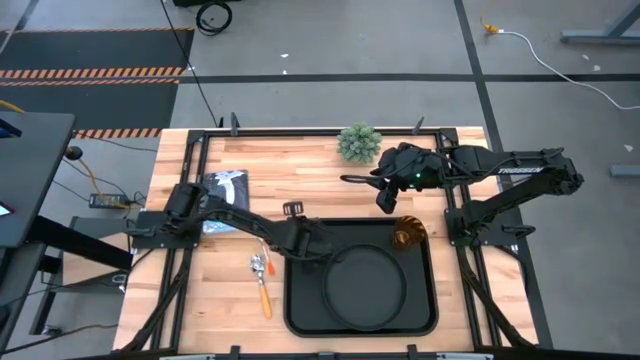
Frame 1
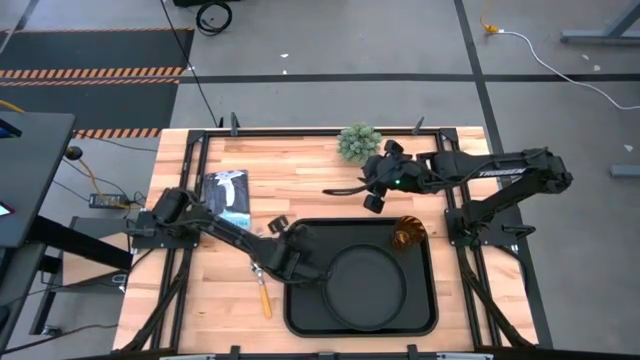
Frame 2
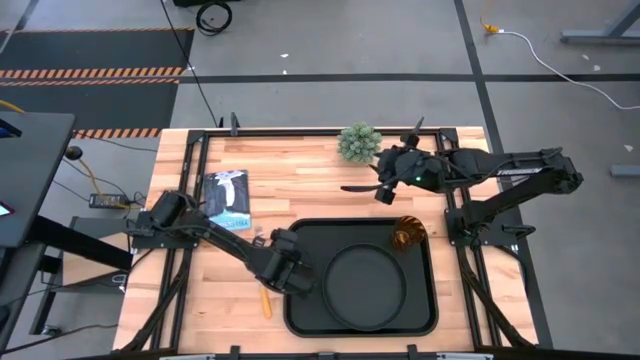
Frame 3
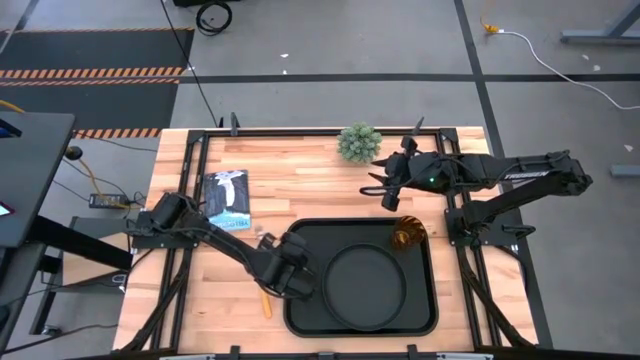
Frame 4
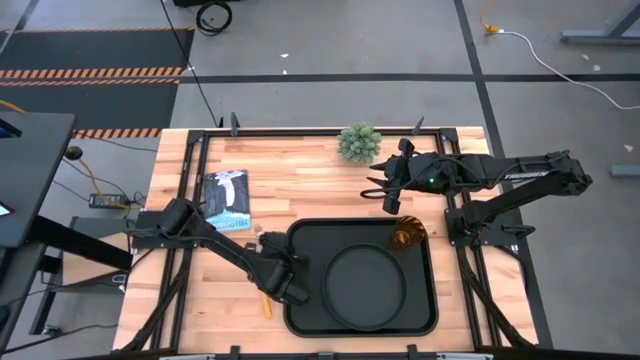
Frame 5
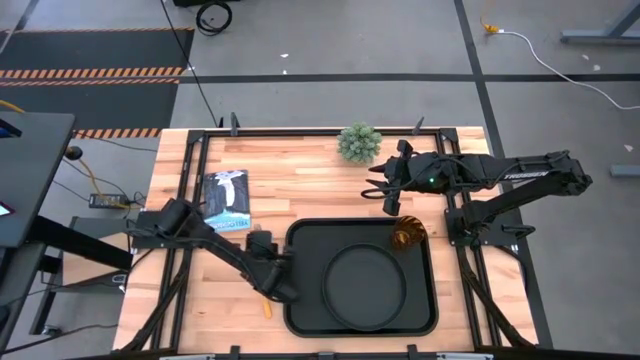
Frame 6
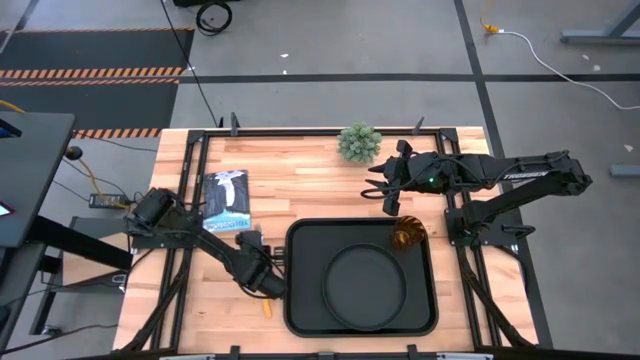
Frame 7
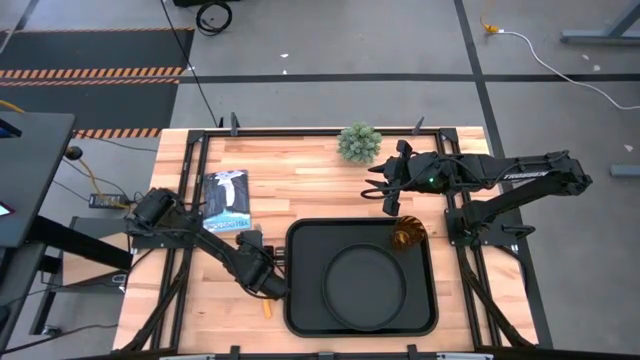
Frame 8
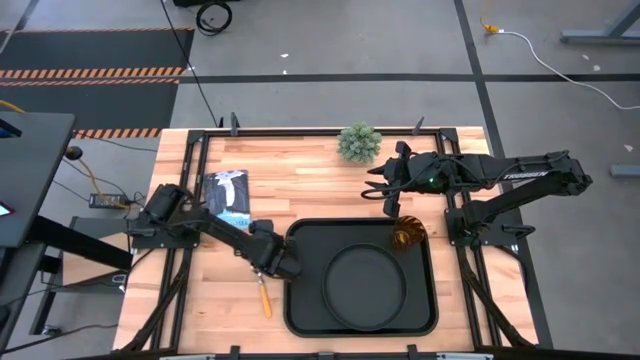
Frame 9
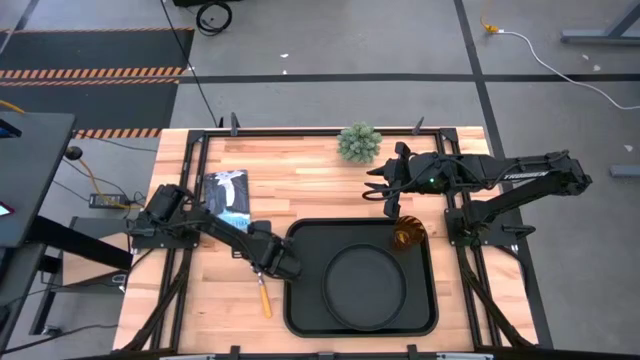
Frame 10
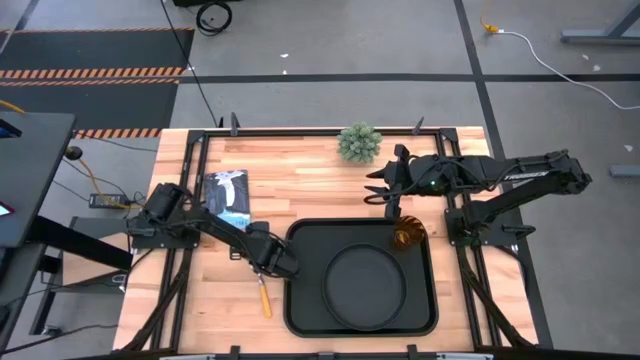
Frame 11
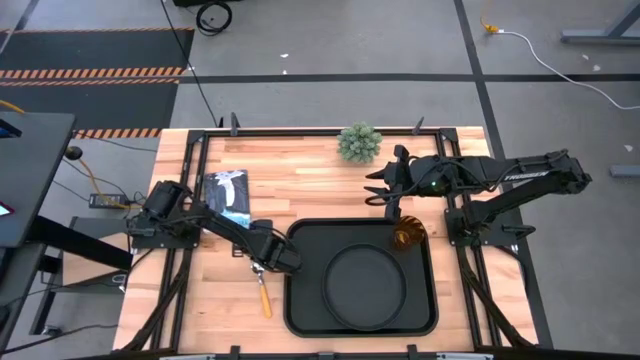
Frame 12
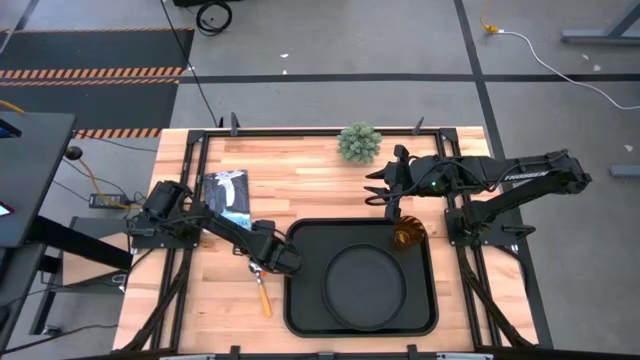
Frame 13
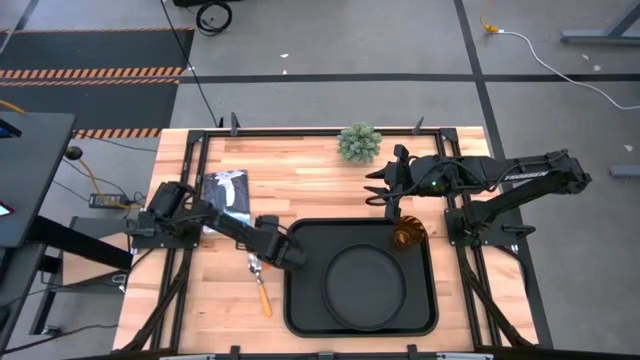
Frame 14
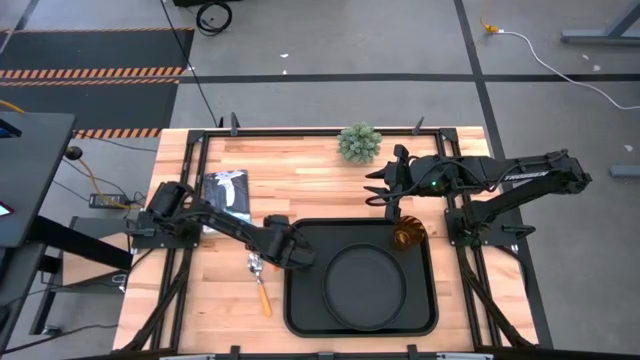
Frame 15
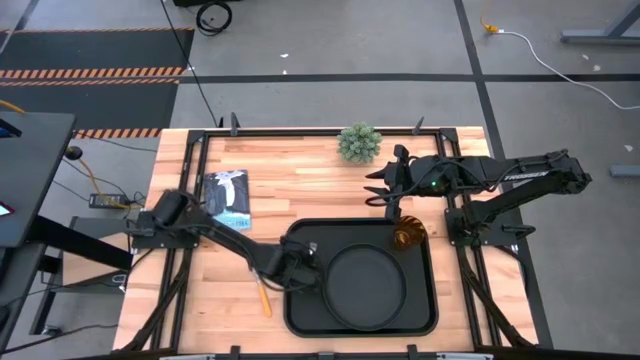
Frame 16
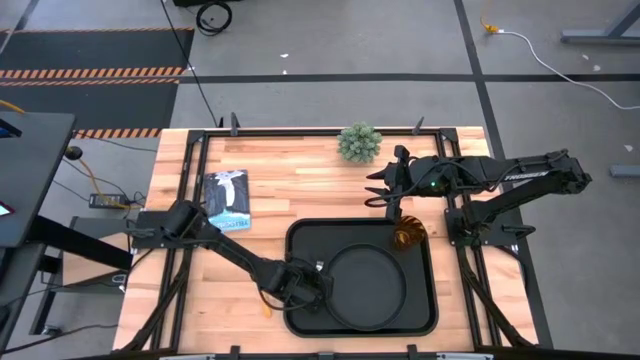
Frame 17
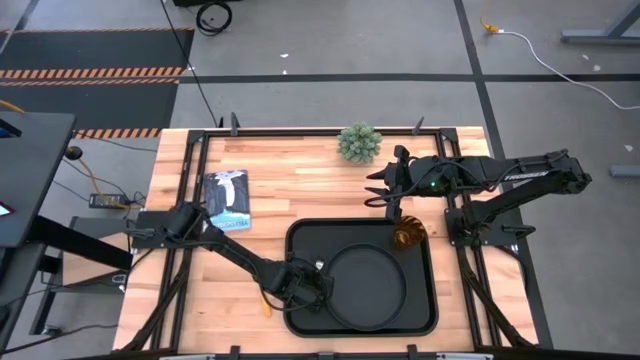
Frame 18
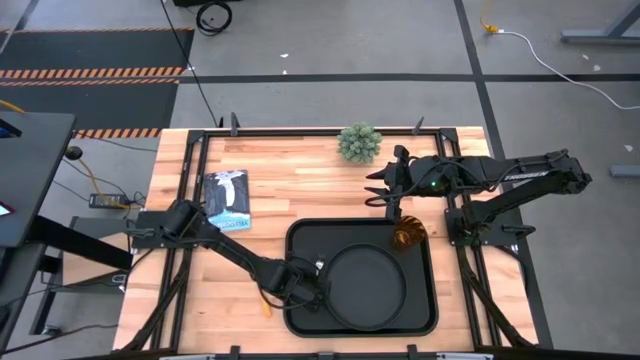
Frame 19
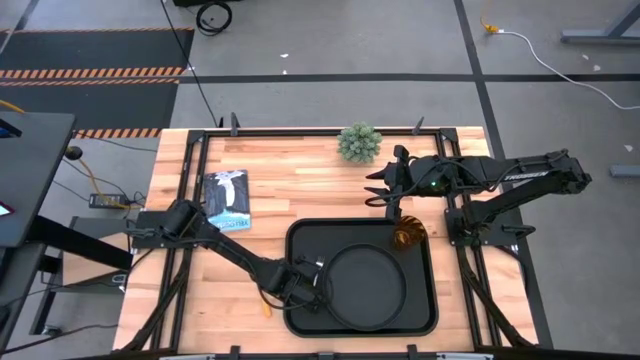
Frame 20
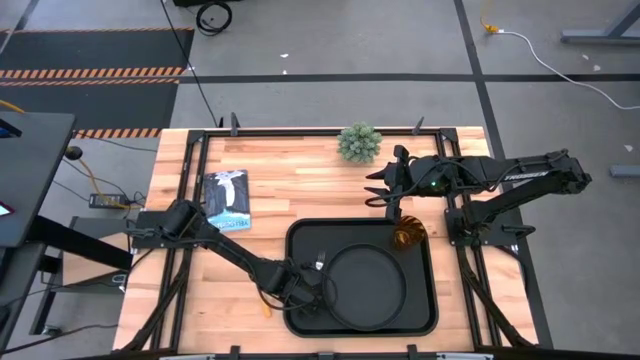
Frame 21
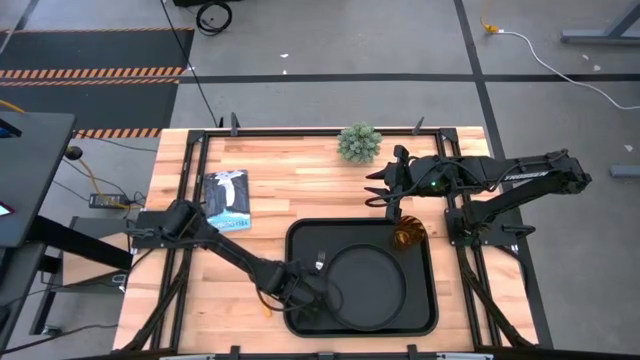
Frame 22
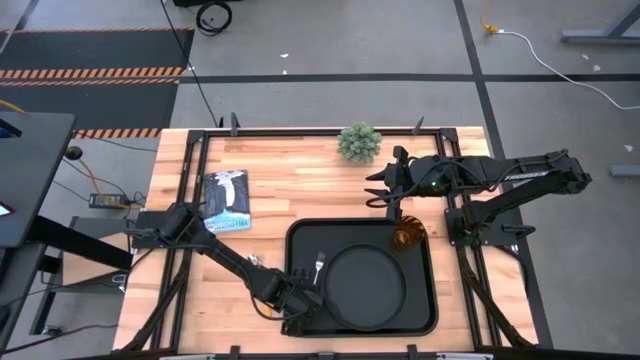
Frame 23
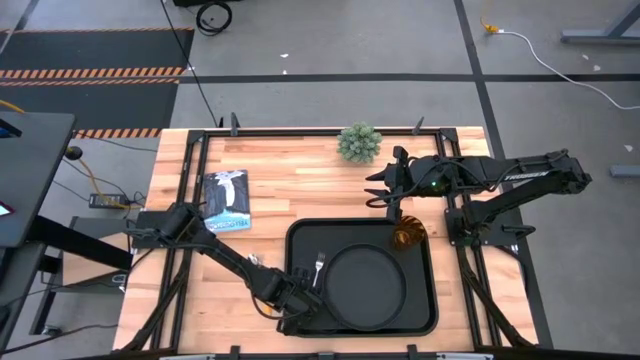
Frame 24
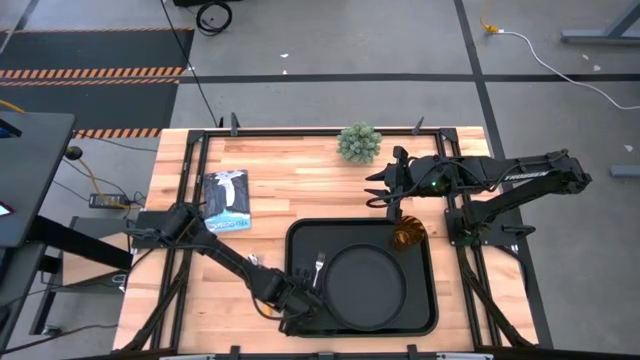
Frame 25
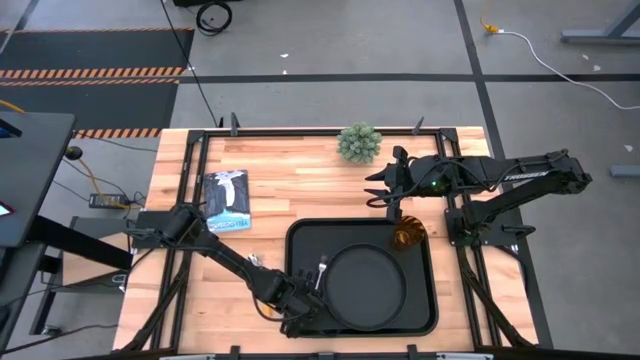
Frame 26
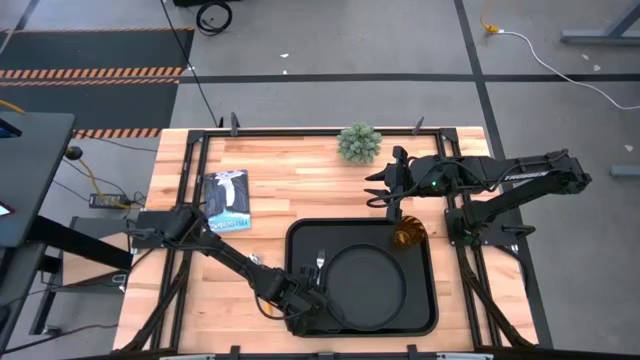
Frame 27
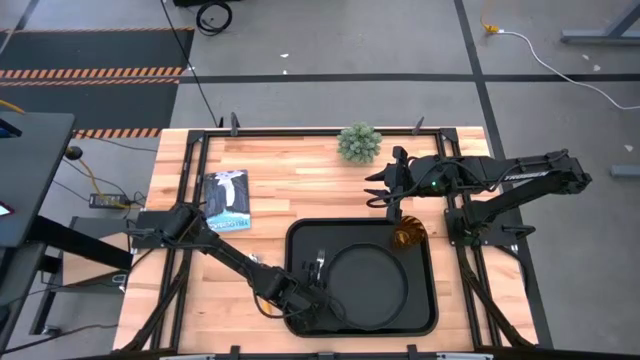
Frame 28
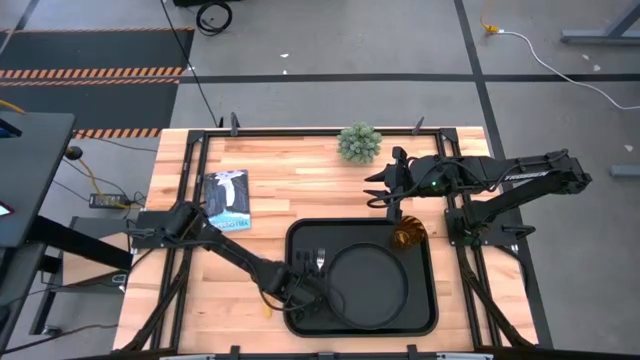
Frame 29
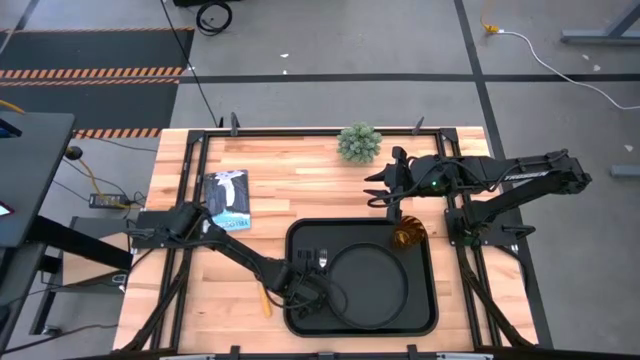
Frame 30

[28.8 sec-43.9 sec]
Task: Pick and place plate/cup/fork/spoon on tray
Put the fork on the black tray to the left of the black plate

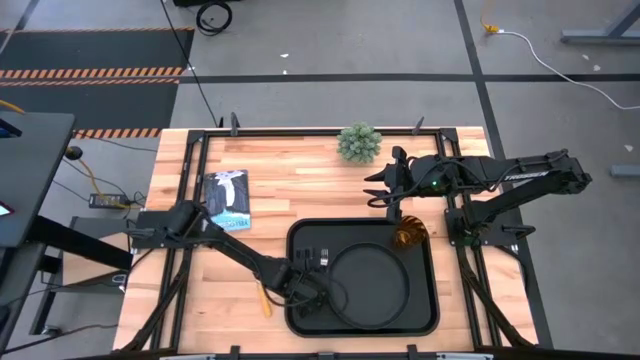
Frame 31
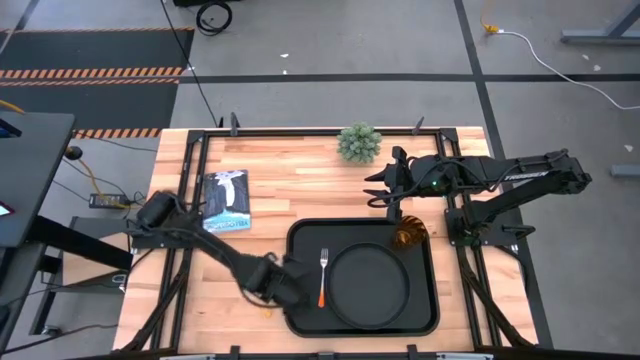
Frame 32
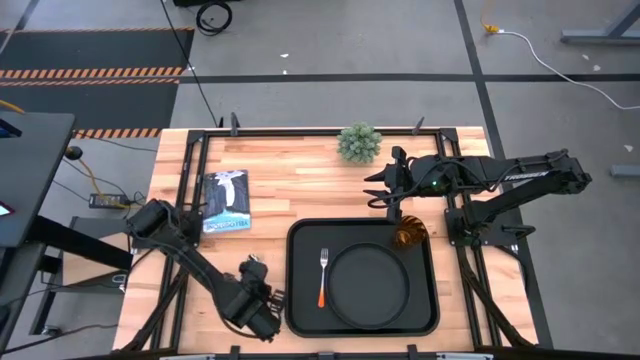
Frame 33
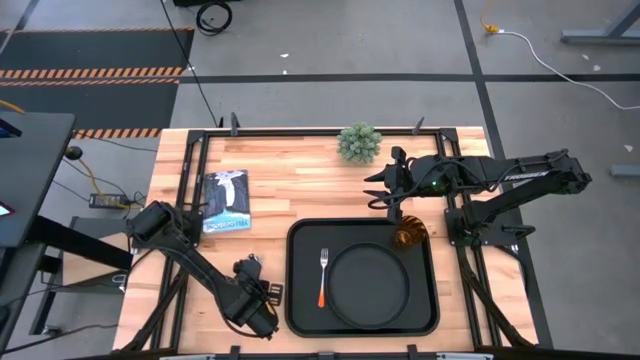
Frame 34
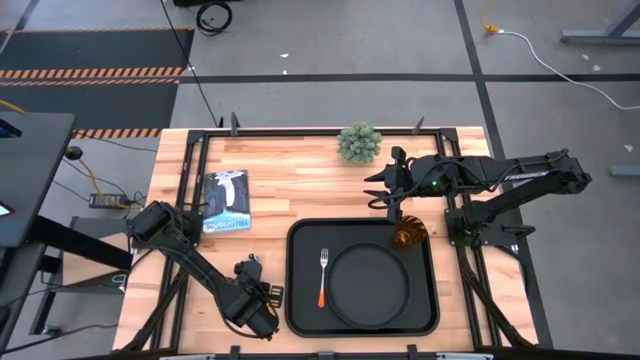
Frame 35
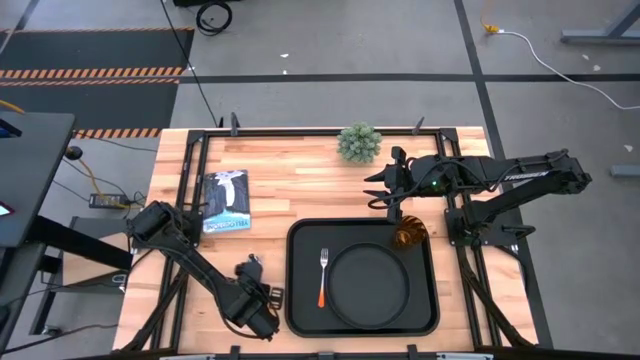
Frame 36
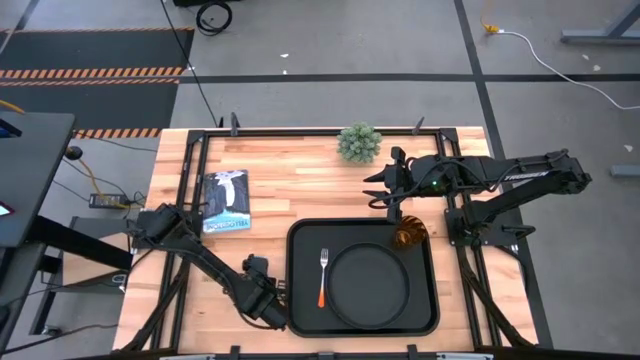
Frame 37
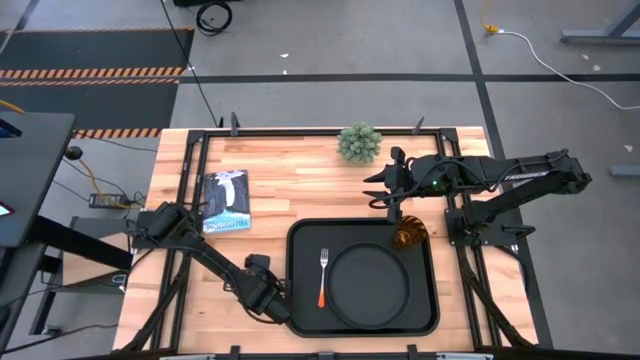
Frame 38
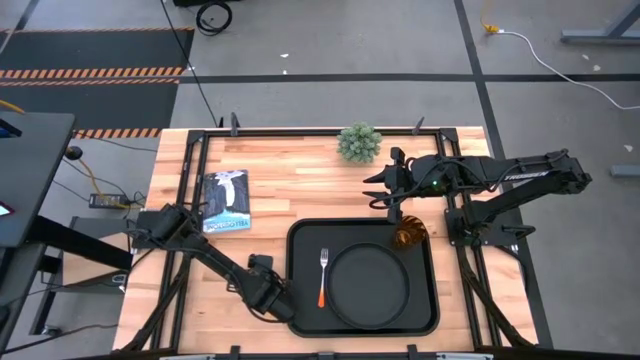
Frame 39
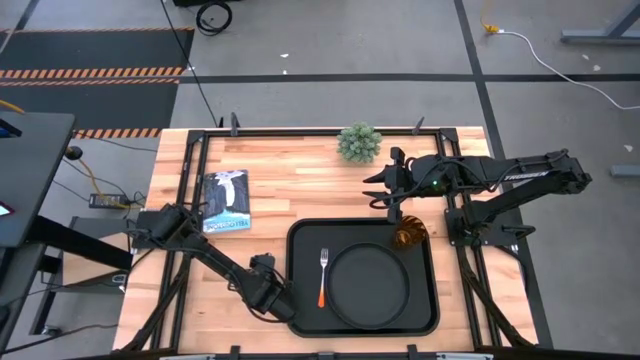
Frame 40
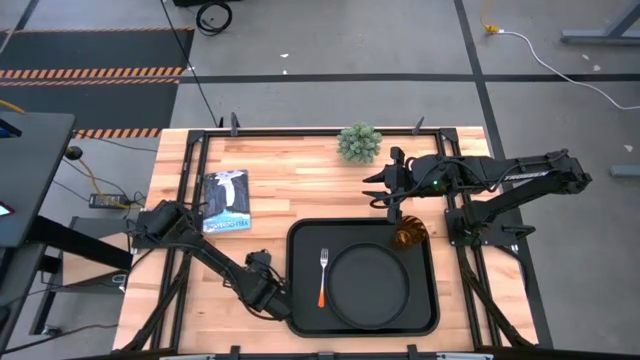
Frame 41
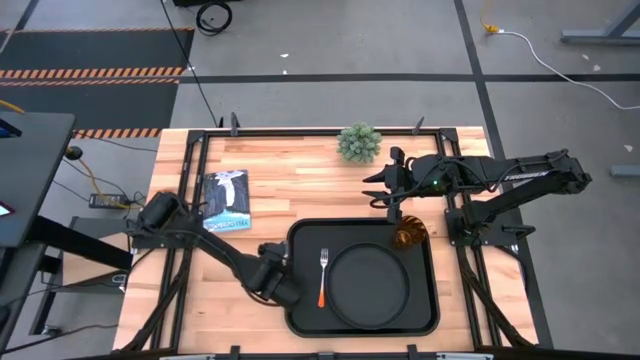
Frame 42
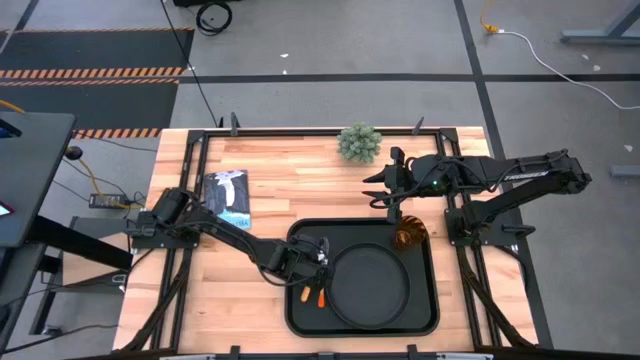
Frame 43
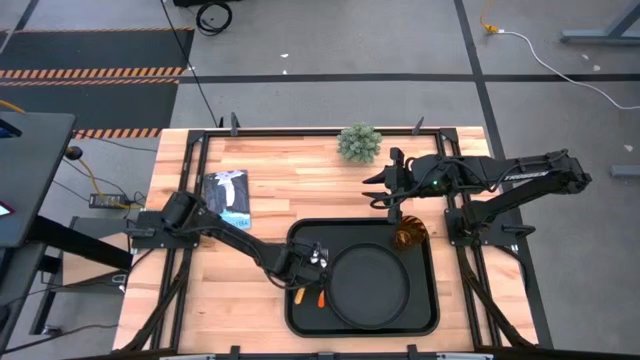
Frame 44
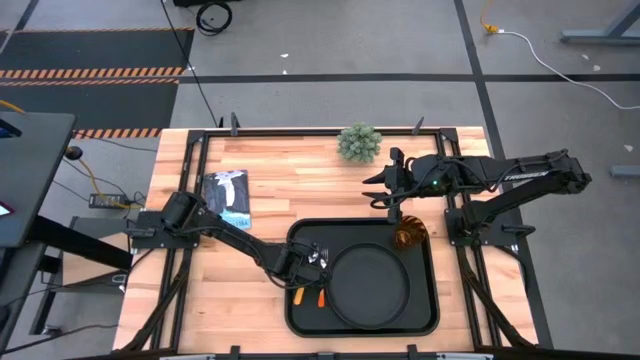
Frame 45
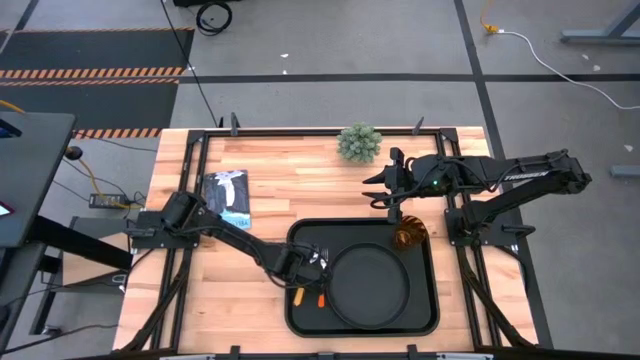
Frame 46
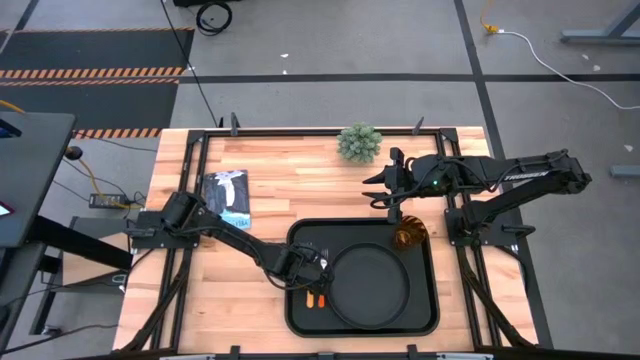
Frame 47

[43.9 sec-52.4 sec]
Put the spoon on the black tray to the left of the fork
